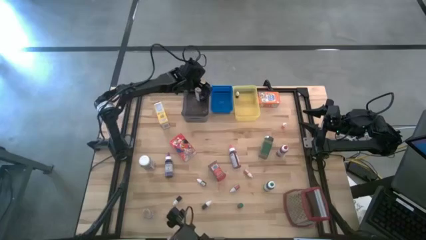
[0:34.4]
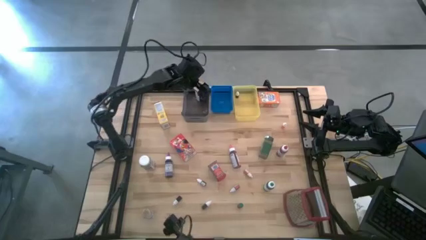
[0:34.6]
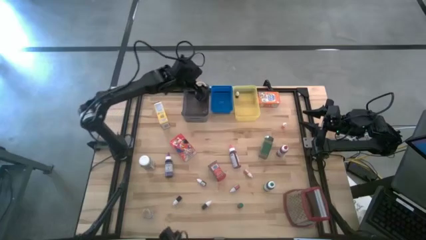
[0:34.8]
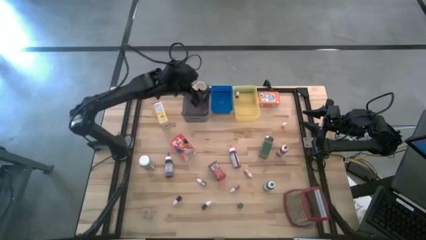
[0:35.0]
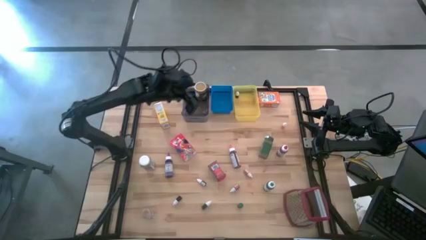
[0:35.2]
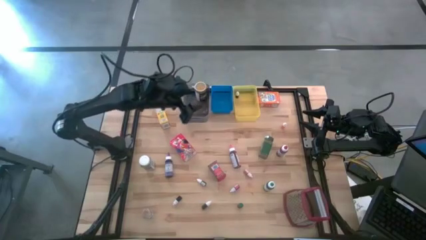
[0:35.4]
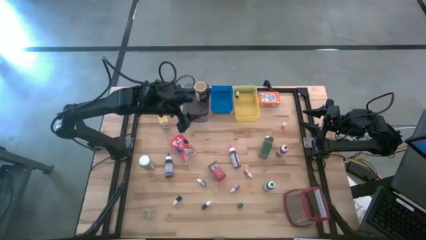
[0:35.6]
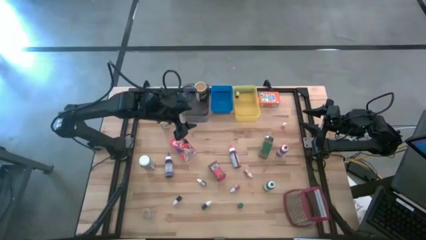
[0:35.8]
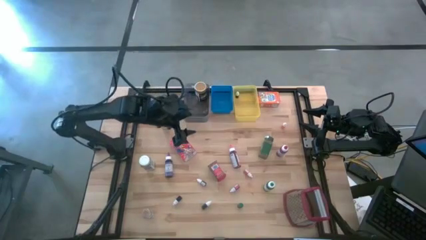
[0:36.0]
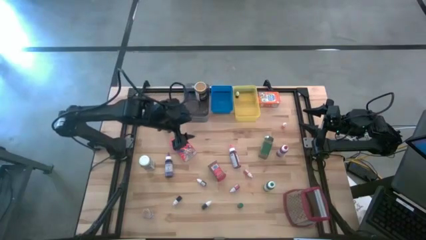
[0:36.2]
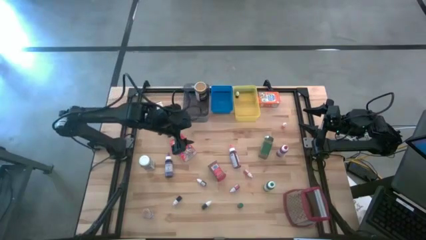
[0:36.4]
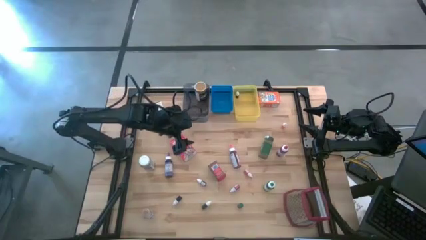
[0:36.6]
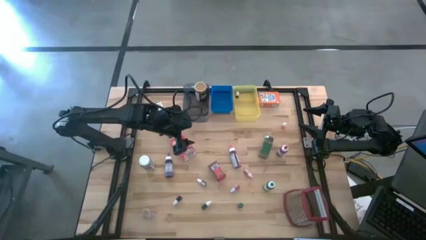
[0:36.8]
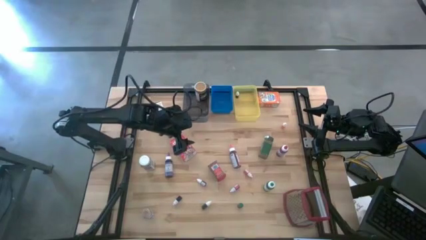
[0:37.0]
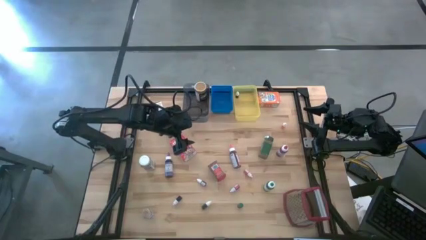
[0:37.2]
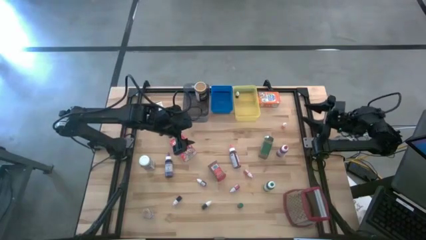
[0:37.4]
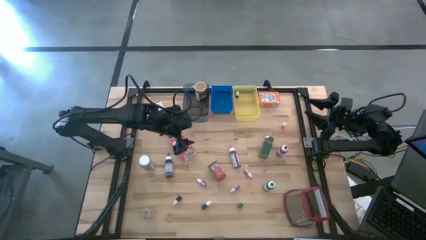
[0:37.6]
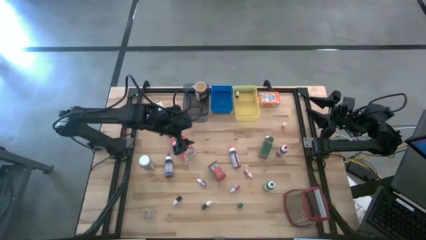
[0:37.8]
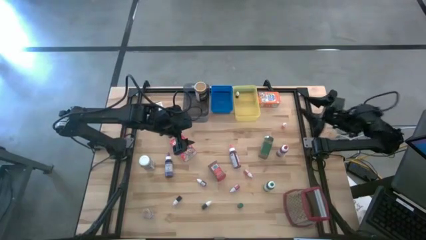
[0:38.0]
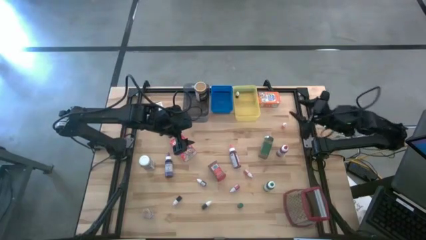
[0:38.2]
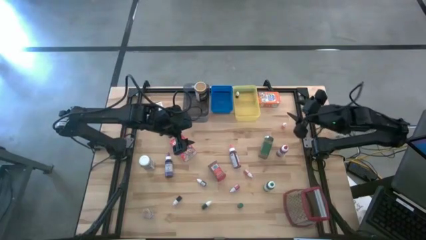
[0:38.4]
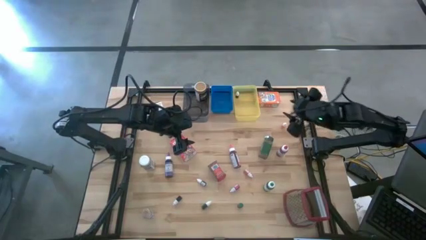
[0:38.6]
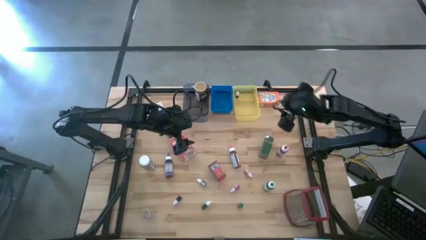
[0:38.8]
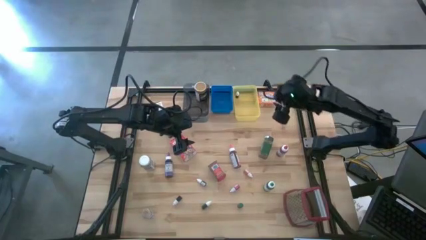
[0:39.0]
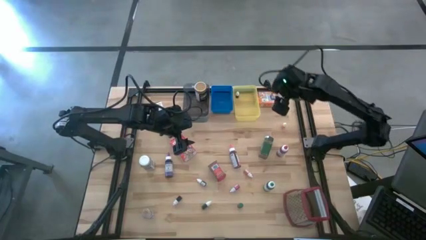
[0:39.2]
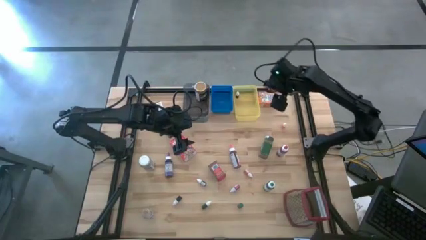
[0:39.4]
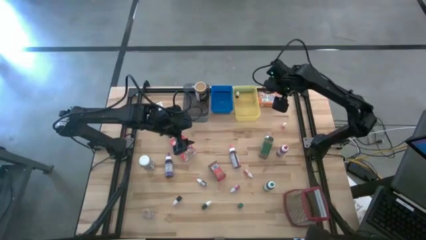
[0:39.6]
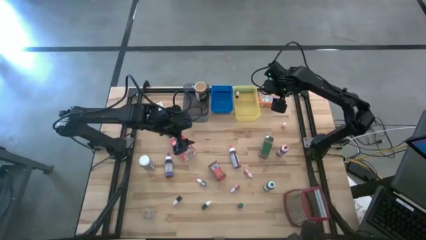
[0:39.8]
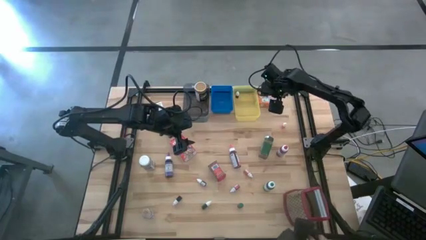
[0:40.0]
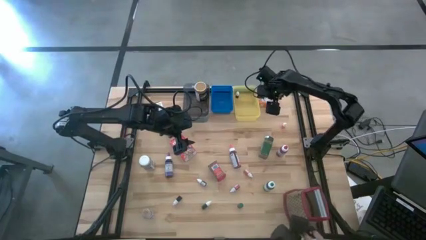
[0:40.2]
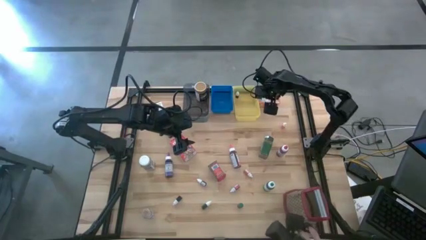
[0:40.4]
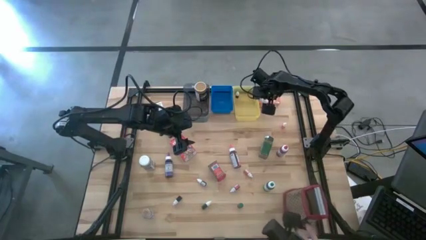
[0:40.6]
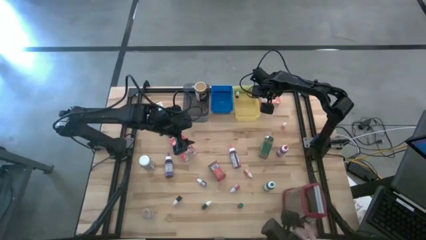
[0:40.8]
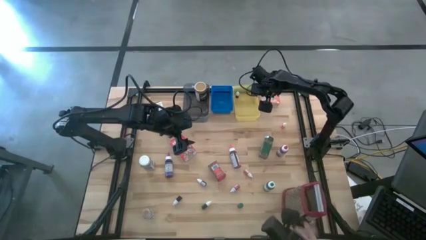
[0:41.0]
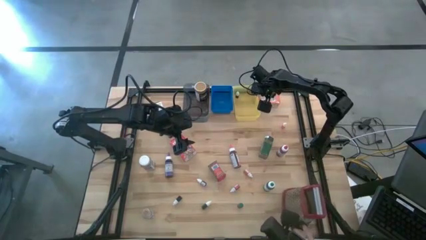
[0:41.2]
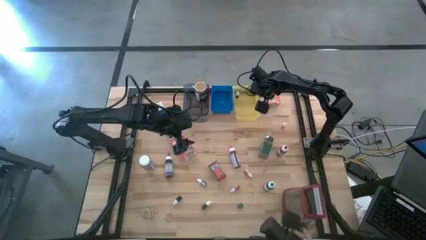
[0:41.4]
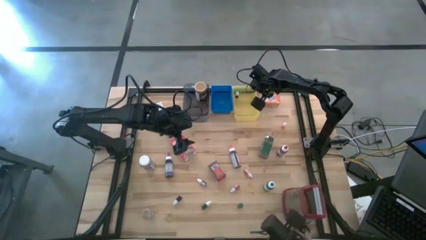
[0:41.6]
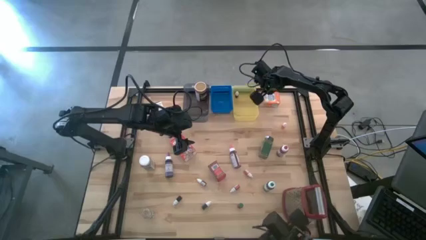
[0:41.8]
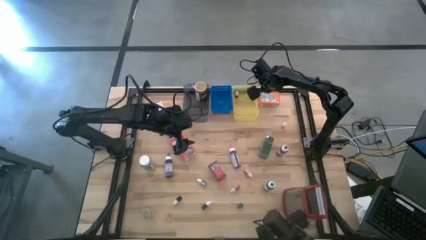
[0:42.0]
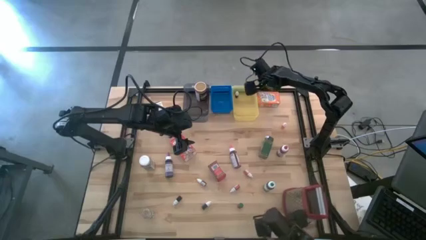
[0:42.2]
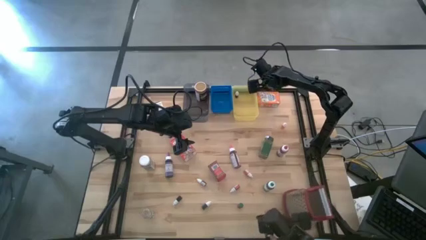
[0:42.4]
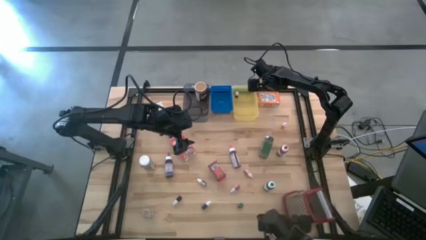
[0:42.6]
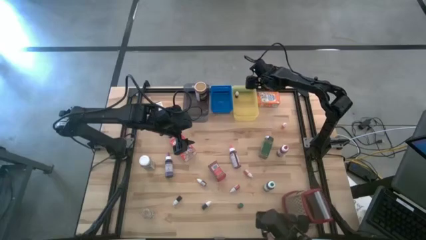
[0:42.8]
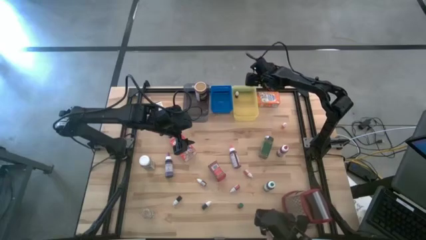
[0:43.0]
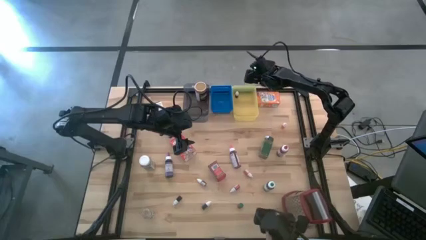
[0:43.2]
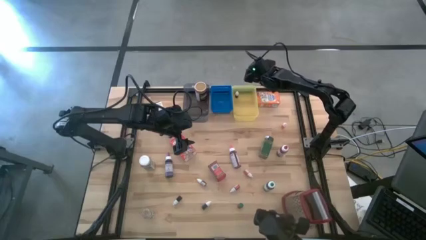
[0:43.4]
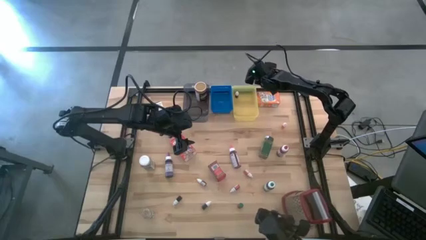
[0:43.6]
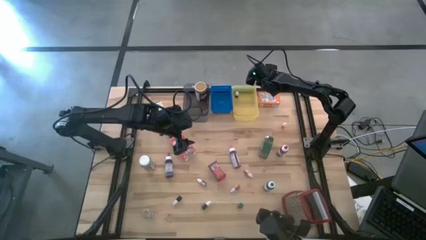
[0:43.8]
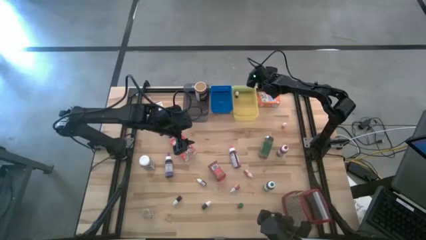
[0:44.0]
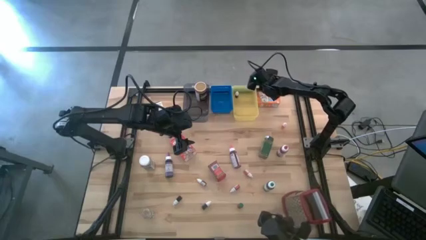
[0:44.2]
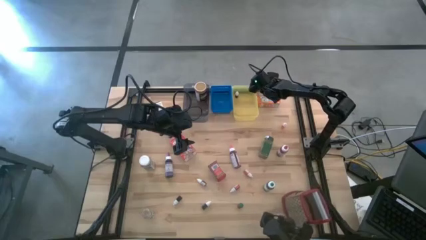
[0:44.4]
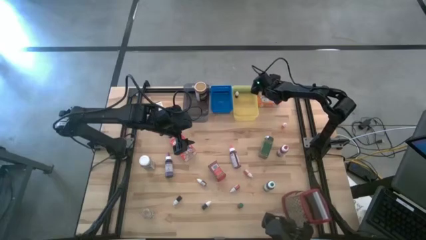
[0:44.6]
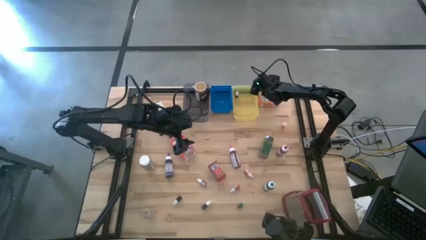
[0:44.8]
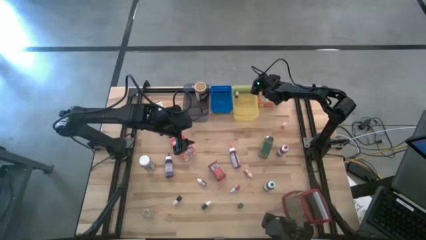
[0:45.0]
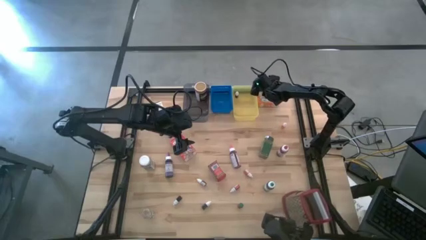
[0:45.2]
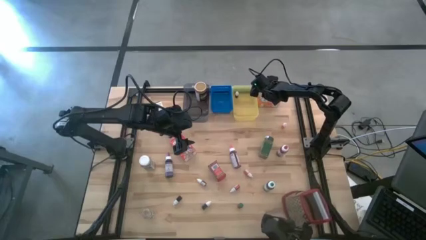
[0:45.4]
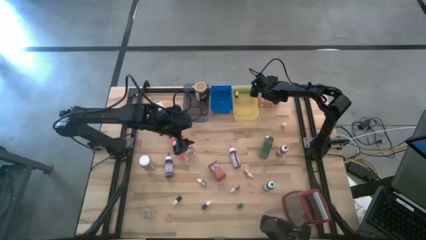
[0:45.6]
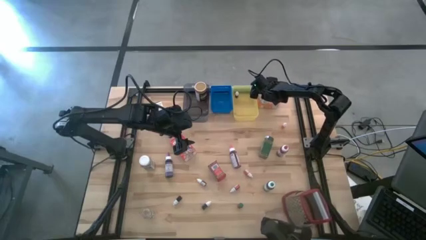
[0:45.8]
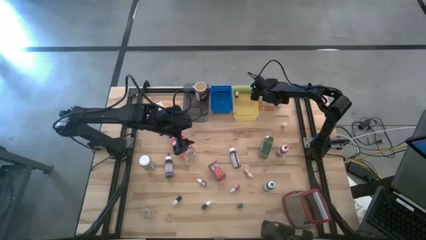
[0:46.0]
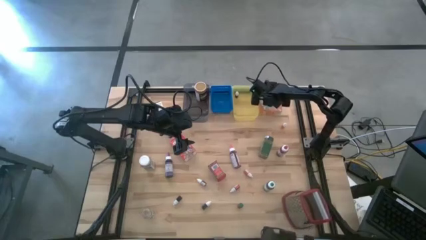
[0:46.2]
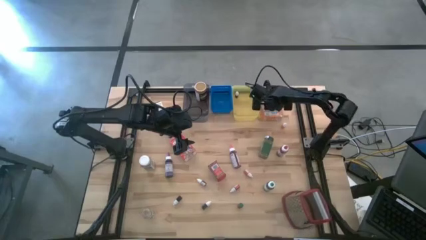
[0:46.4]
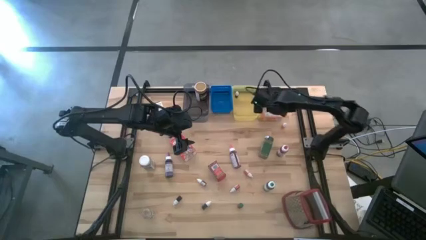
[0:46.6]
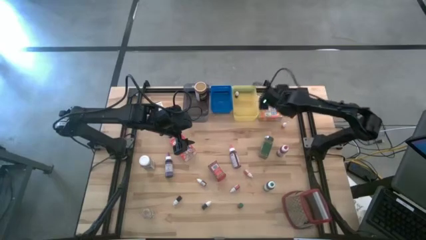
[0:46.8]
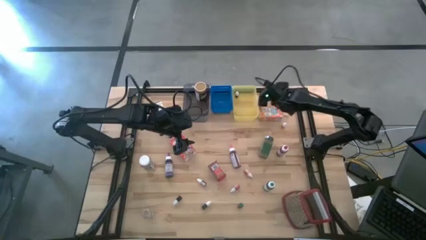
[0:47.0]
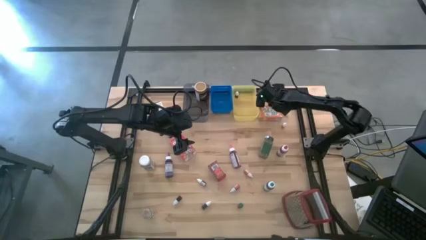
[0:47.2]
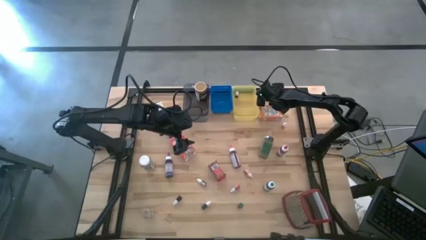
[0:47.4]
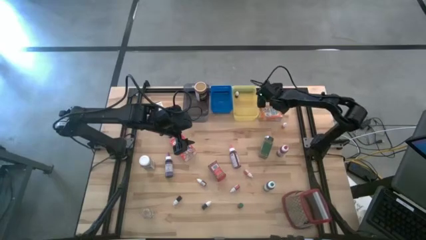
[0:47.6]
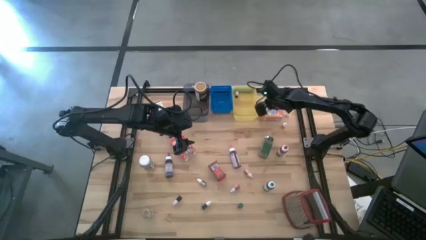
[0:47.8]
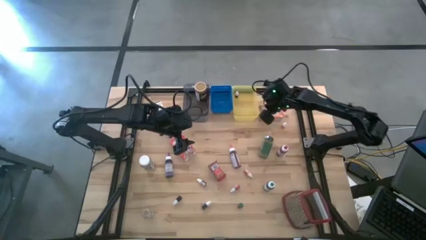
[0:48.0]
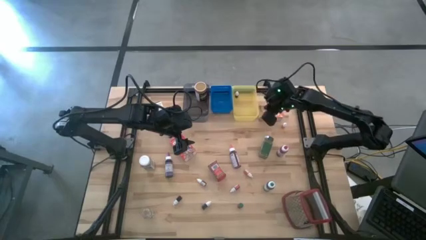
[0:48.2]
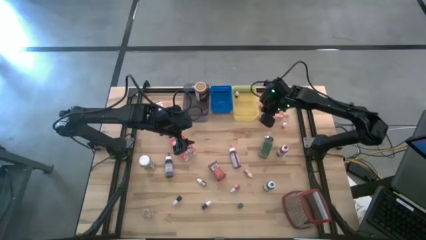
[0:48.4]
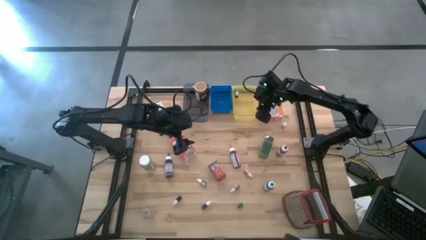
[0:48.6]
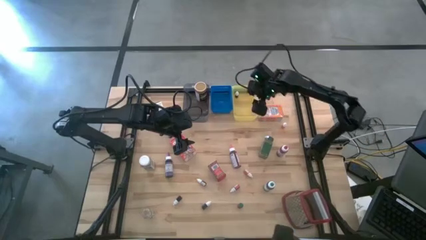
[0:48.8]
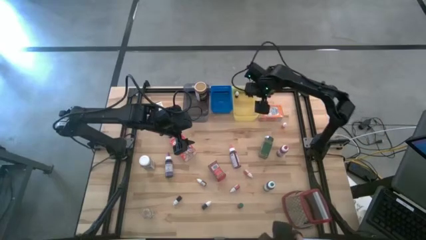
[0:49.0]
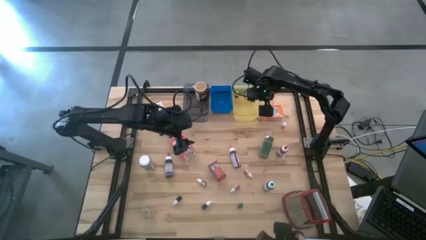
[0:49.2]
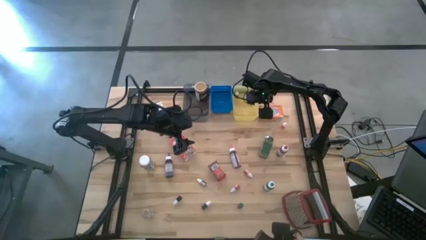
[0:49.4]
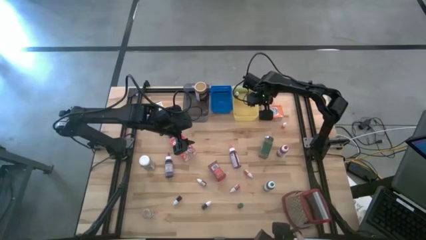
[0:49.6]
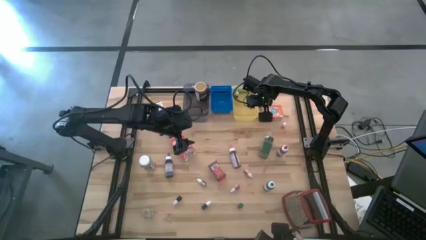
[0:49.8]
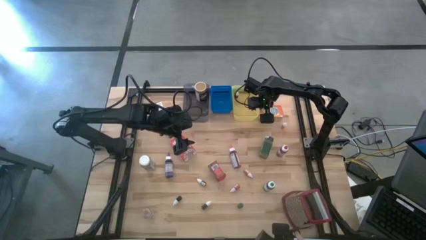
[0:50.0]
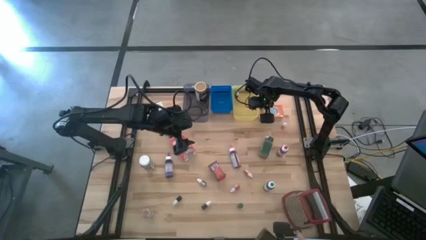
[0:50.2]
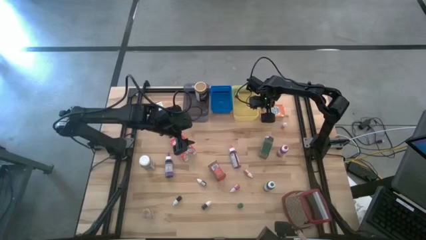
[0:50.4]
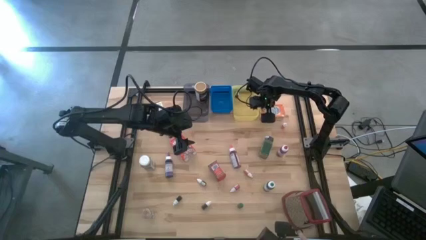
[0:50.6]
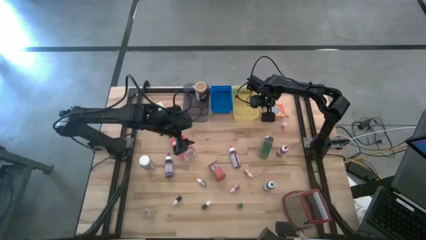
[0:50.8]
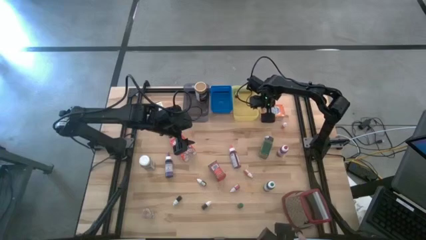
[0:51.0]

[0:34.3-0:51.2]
Task: Pick & Place Kitchen Items
Put the orange cereal box into the blue bin
